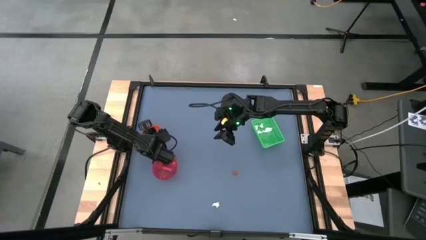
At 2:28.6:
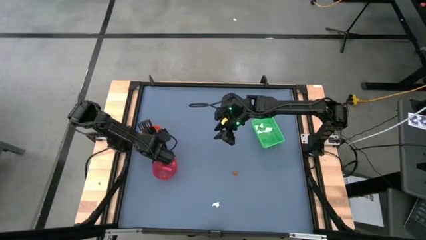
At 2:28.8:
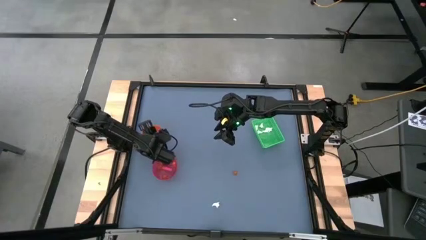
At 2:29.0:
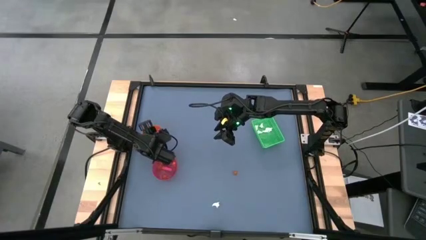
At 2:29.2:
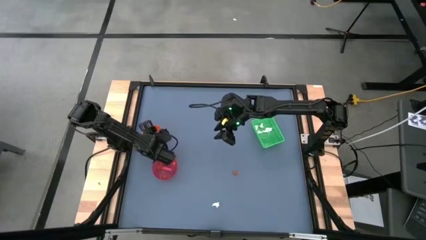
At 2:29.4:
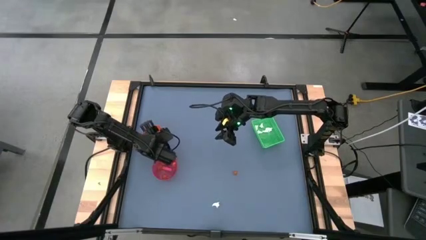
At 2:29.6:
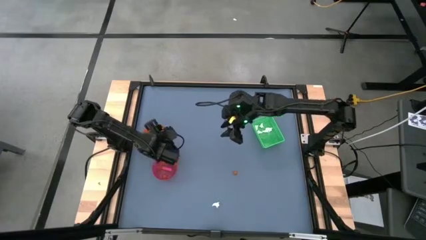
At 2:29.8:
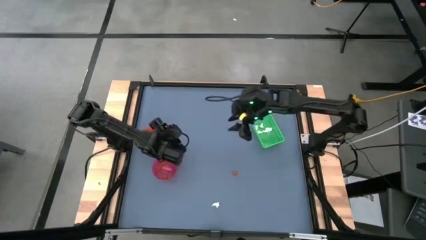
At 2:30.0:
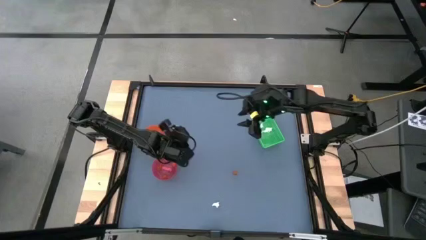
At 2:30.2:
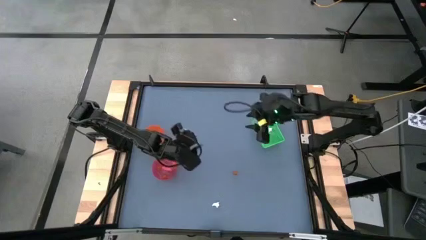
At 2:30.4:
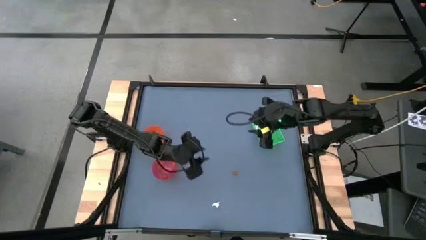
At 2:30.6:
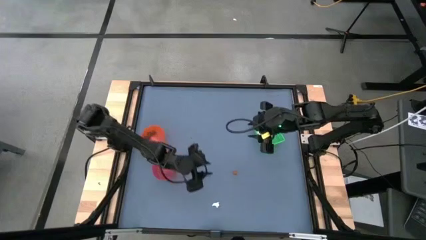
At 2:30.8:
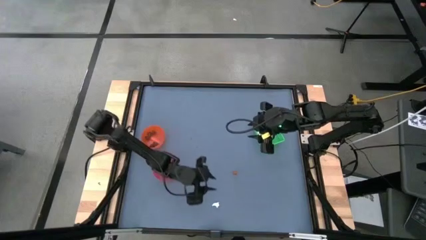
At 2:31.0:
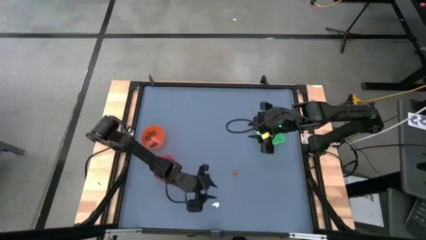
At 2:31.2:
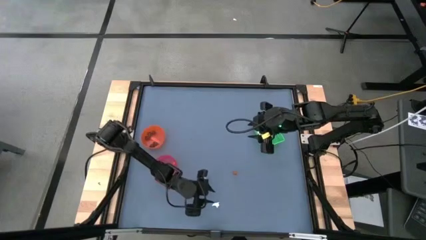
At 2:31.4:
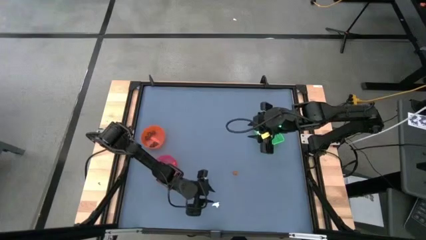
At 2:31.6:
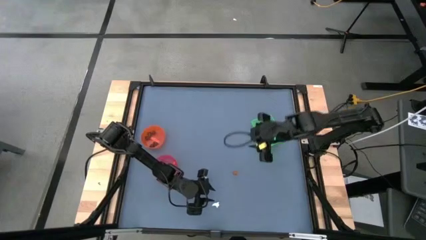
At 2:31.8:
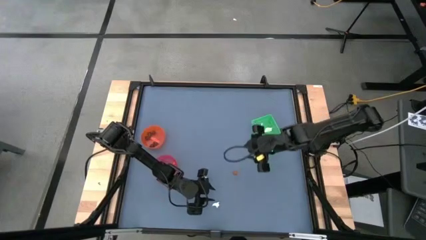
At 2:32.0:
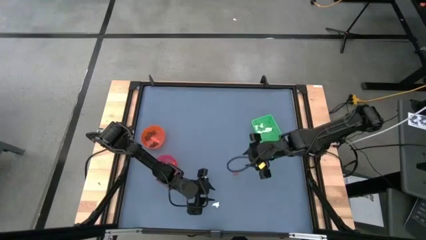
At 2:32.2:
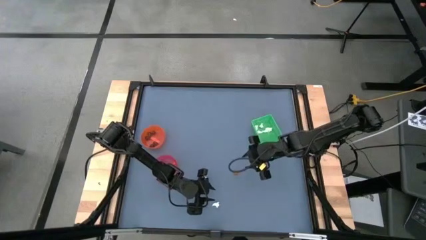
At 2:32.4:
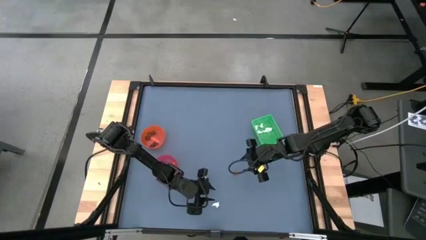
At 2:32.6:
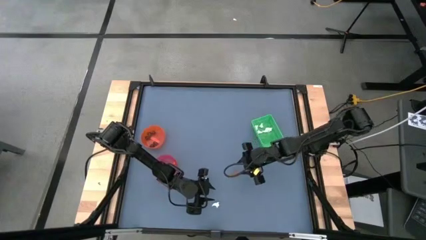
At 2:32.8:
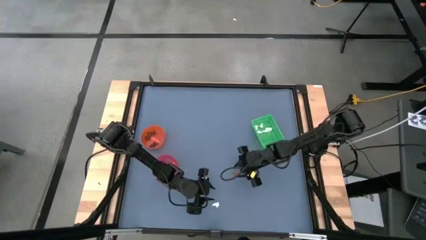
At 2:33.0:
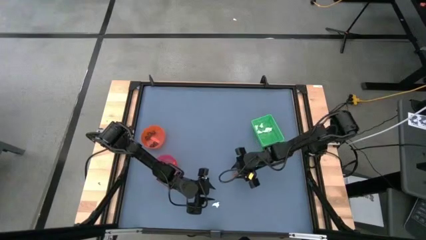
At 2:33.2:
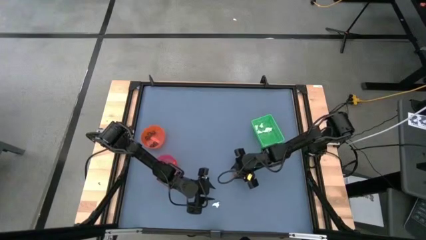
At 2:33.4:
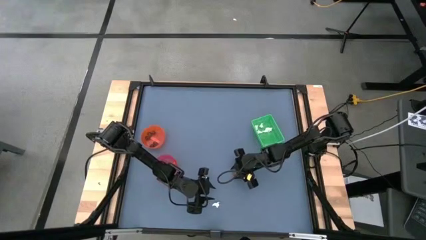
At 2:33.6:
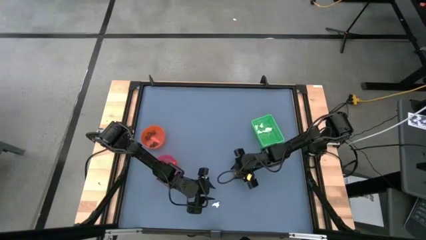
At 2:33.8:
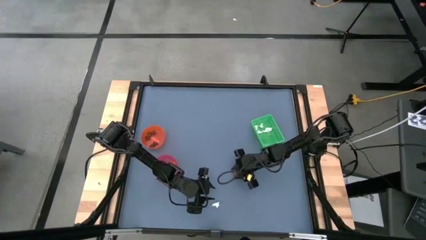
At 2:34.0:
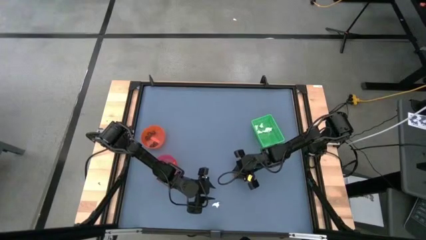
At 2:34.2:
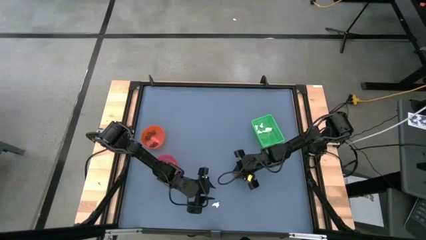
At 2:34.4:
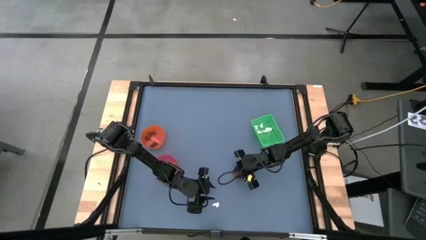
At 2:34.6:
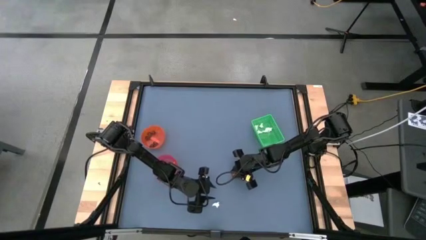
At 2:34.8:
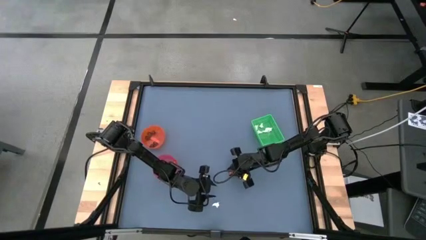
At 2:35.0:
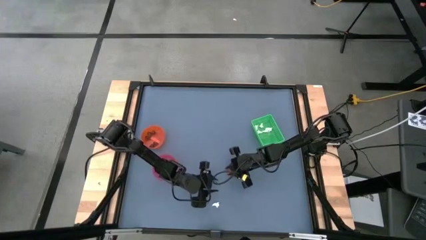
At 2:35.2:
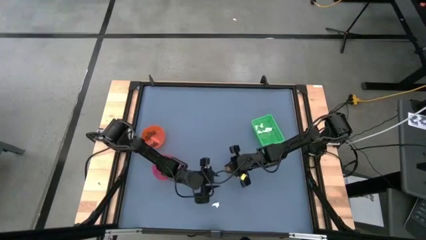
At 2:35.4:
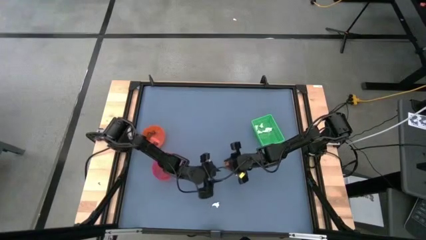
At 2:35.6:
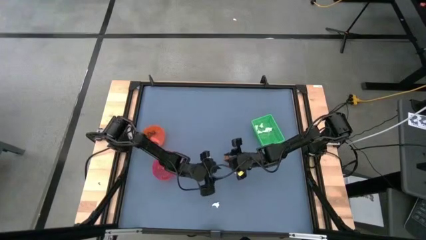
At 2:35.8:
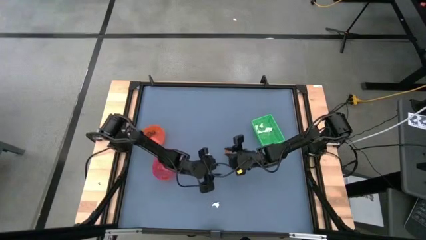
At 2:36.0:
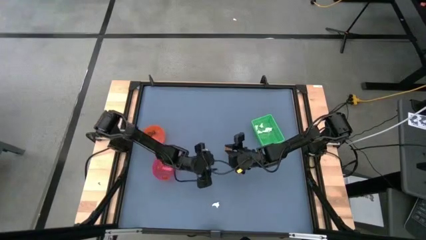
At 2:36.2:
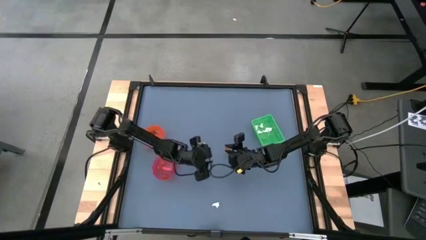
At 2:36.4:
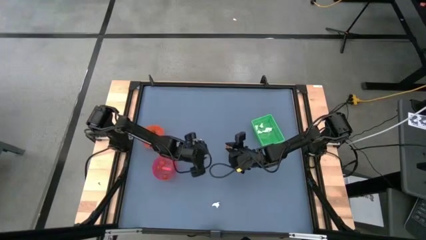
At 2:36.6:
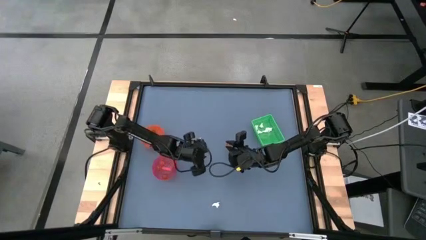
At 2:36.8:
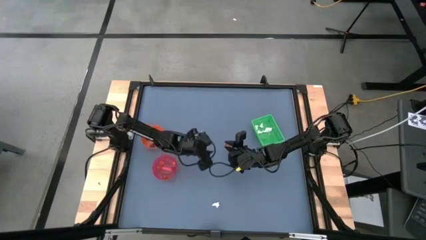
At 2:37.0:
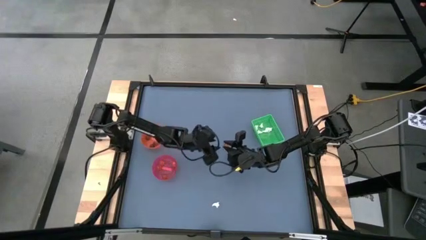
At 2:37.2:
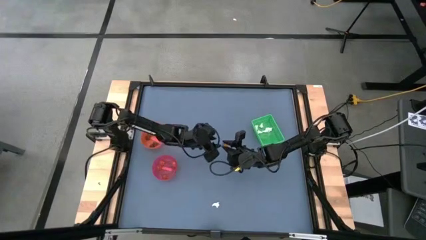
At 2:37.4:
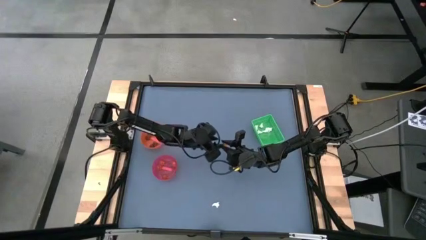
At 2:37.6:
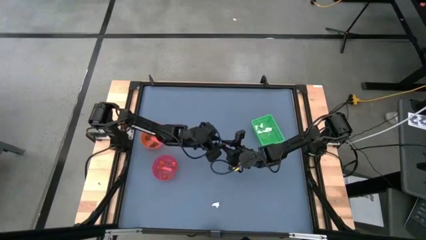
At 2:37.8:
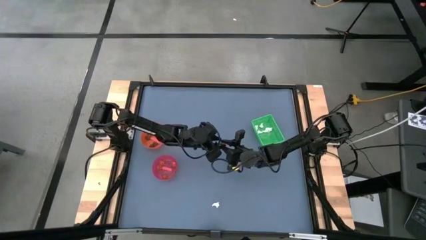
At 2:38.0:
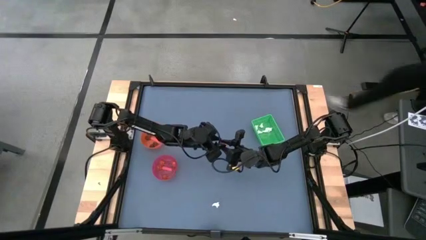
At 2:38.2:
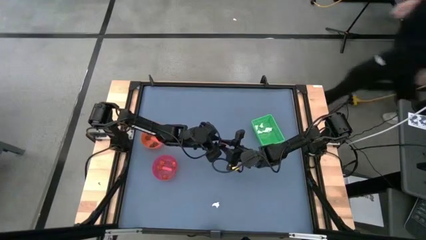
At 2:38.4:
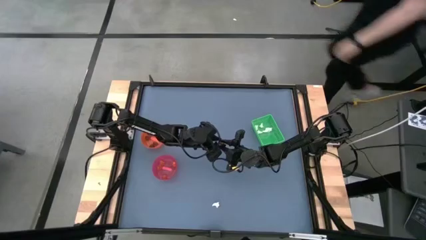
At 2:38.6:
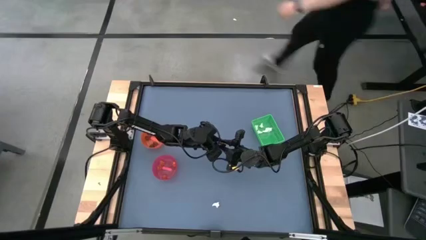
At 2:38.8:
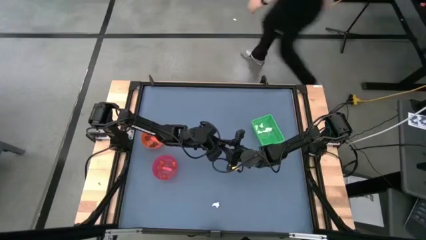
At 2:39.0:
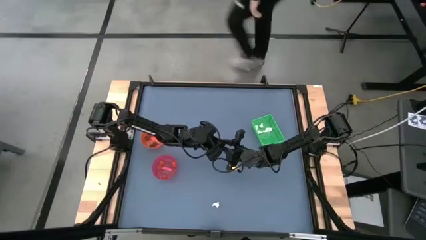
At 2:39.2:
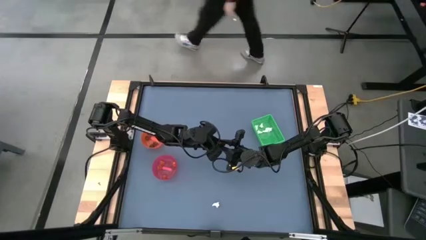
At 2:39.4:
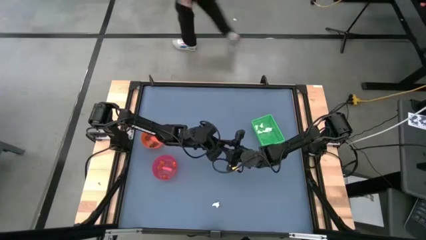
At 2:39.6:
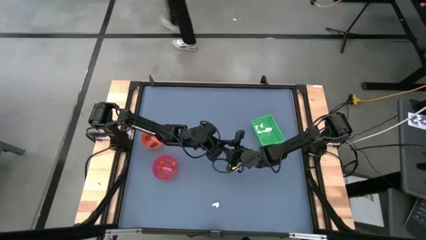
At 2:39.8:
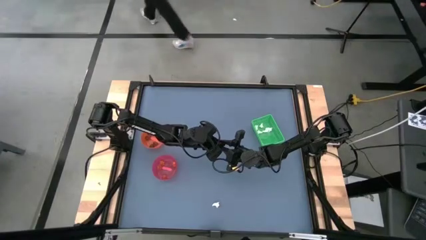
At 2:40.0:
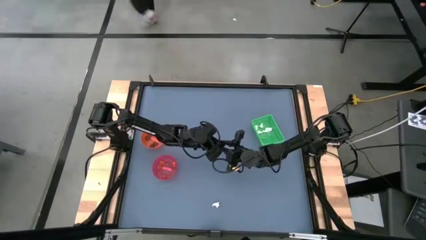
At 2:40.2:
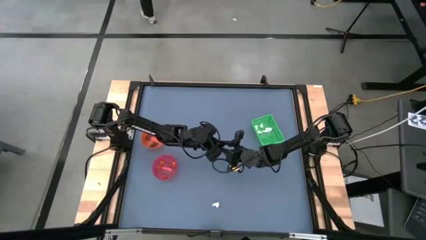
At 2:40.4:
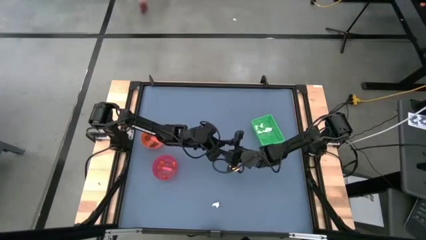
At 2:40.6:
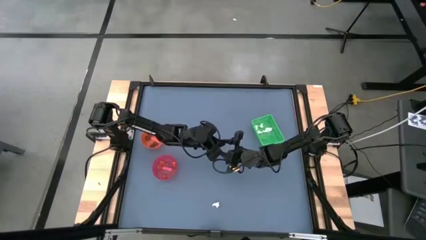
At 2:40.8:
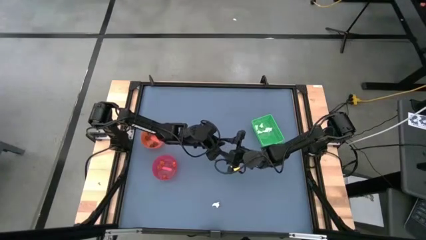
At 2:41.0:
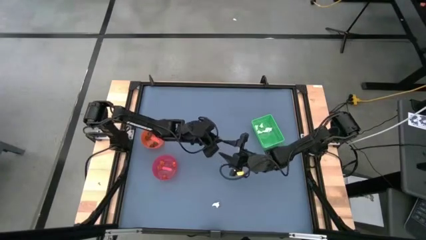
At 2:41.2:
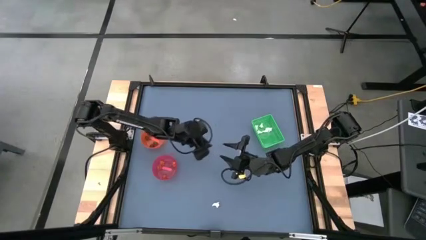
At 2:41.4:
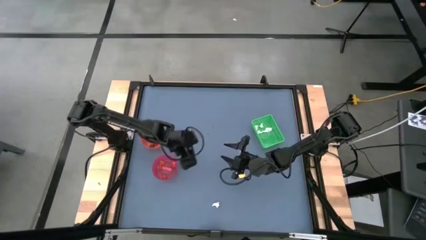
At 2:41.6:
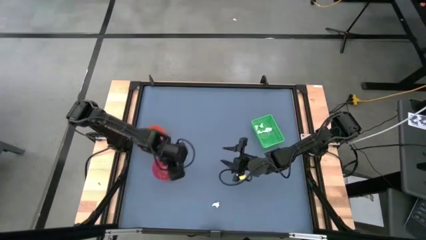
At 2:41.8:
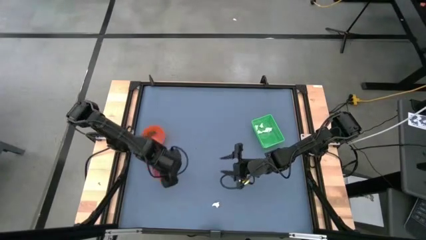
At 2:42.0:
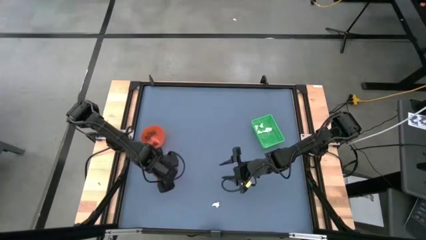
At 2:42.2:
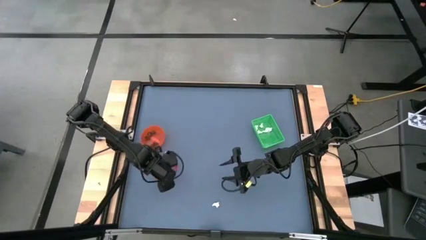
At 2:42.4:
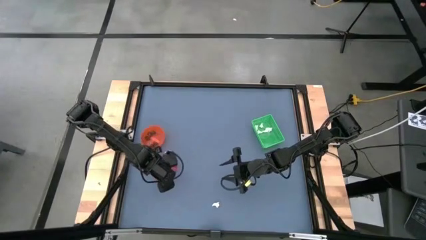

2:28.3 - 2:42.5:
Task: Sort Halloween decoration
Put the orange pumpkin toy into the red bowl

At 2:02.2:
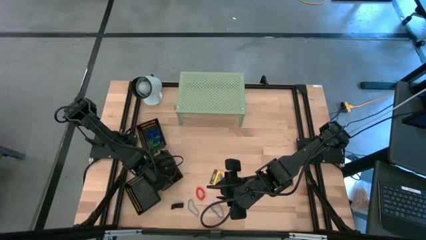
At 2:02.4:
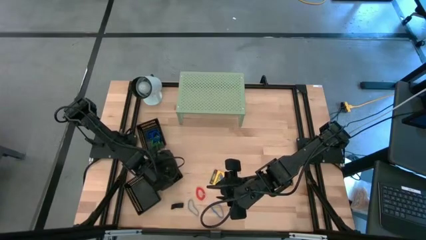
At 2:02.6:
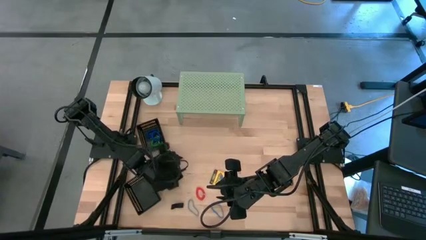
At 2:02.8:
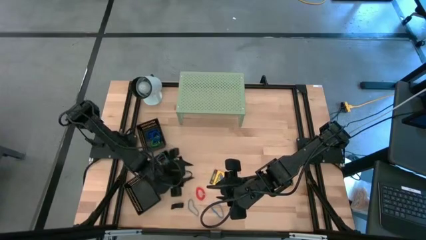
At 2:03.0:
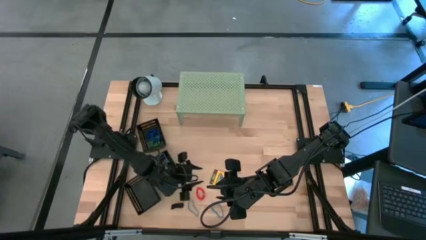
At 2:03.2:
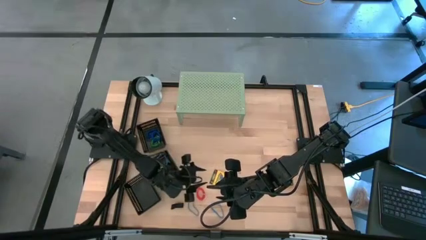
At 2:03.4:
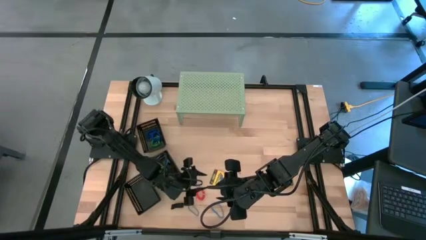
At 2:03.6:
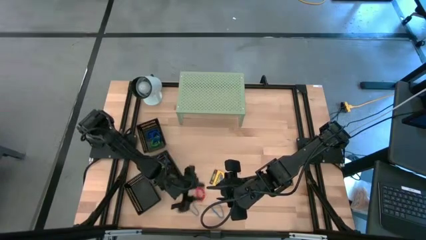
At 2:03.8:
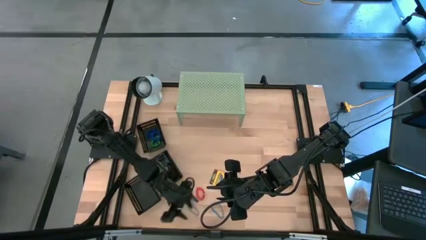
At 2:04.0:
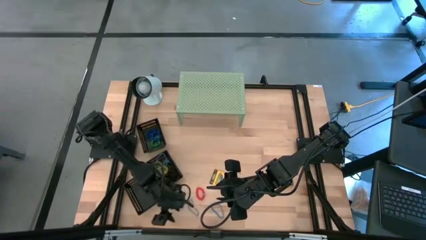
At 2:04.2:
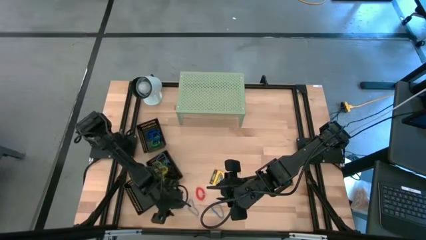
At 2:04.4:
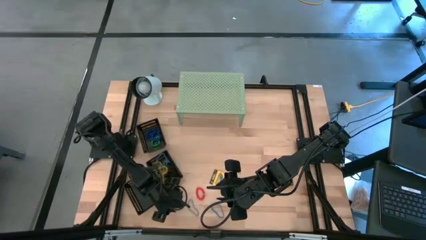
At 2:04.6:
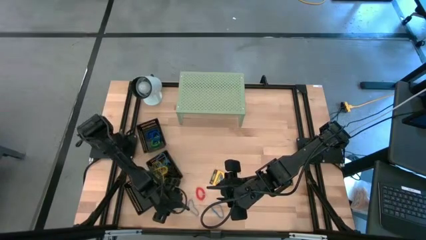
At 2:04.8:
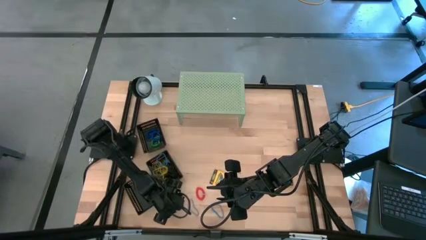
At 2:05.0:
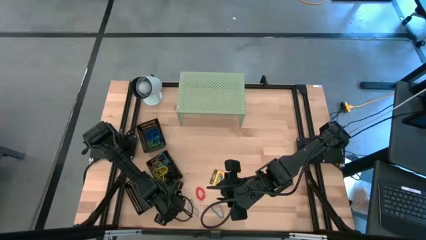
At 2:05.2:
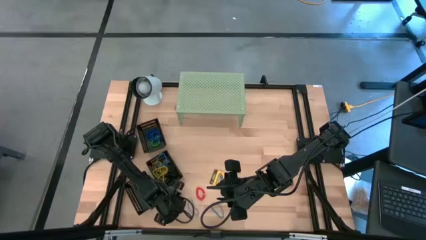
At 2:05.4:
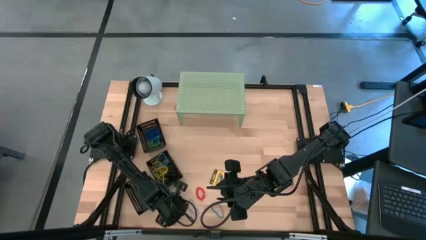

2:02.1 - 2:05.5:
Task: Pick & Place Office Desk Supplies
Put the black rubber band into the middle black bin
